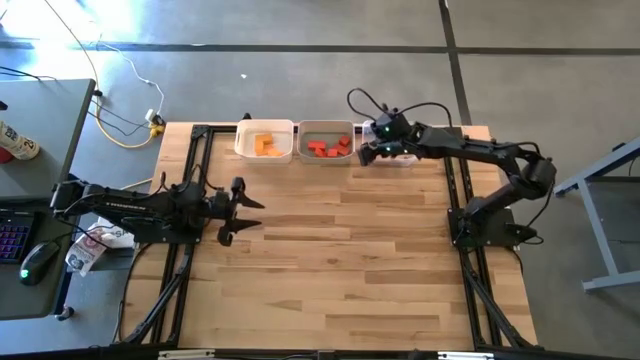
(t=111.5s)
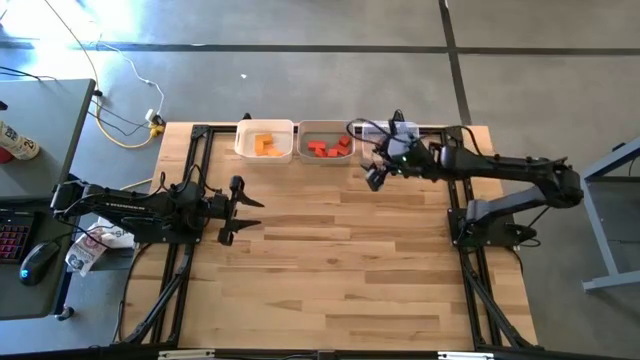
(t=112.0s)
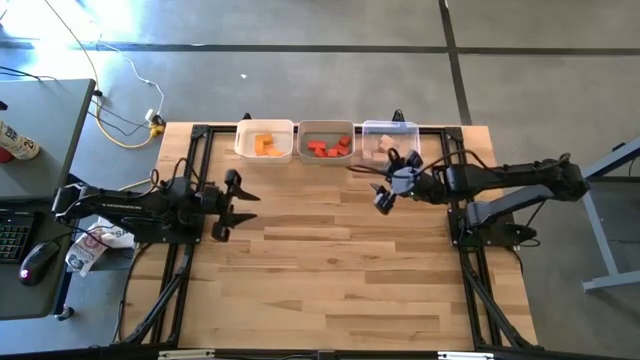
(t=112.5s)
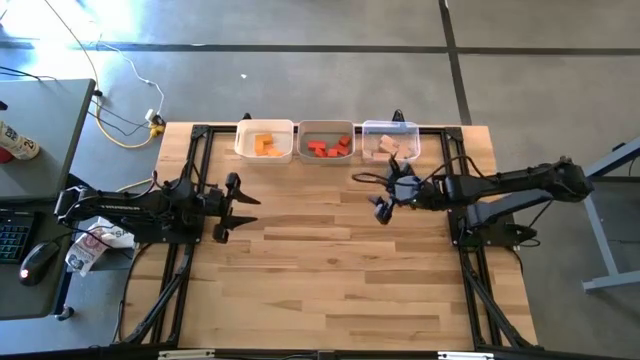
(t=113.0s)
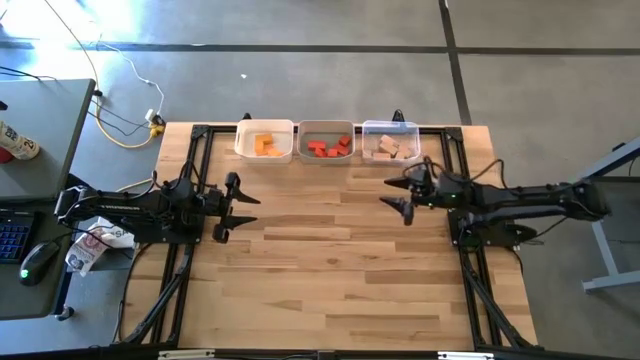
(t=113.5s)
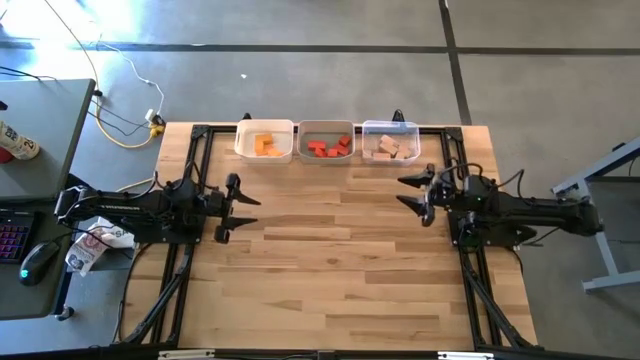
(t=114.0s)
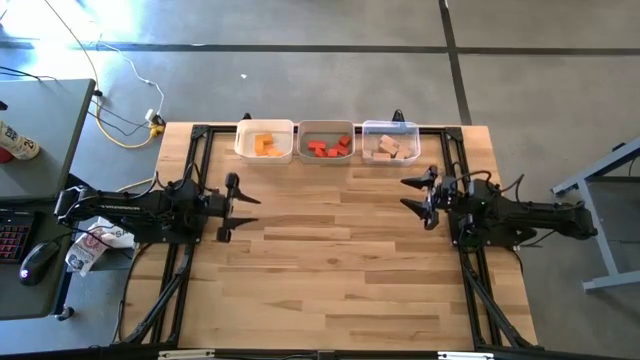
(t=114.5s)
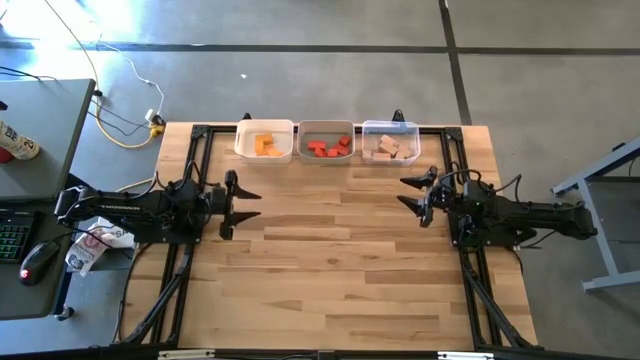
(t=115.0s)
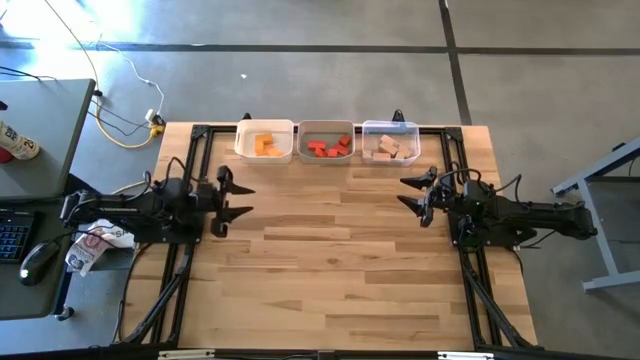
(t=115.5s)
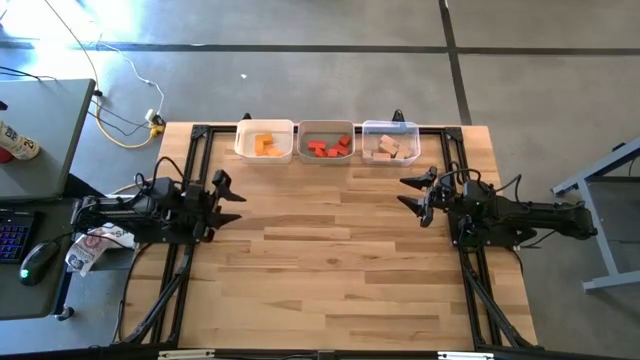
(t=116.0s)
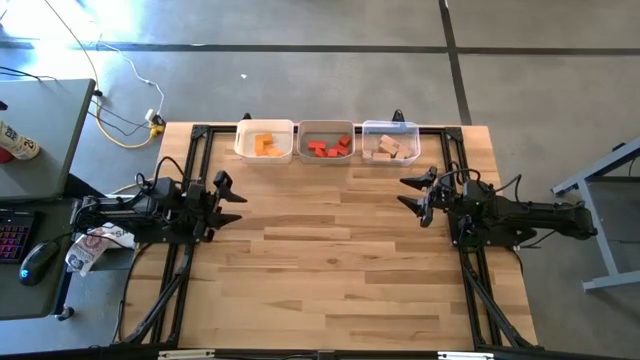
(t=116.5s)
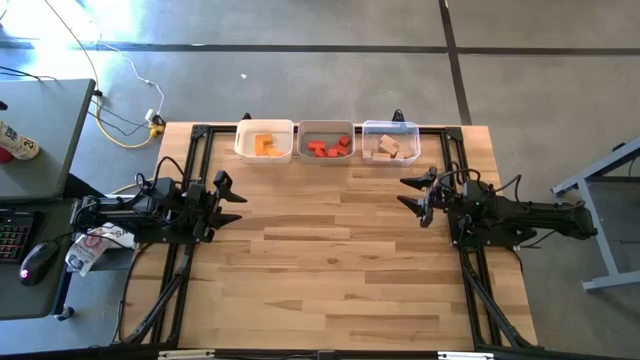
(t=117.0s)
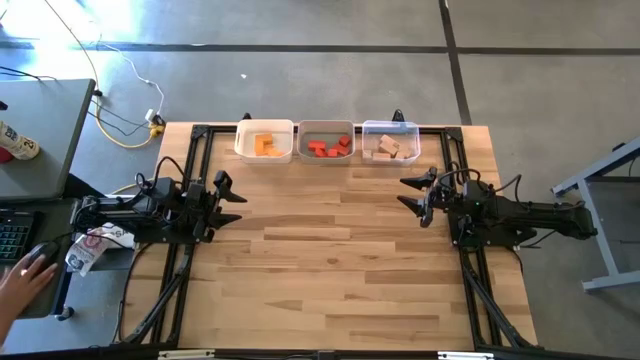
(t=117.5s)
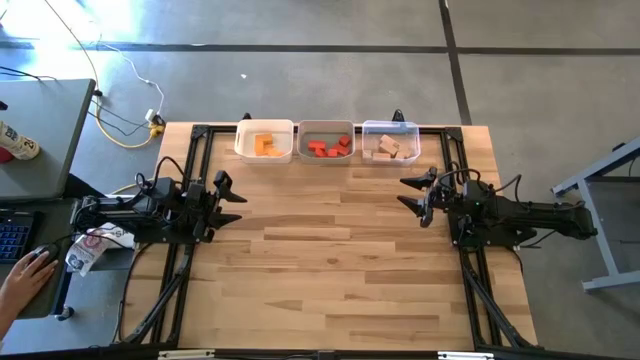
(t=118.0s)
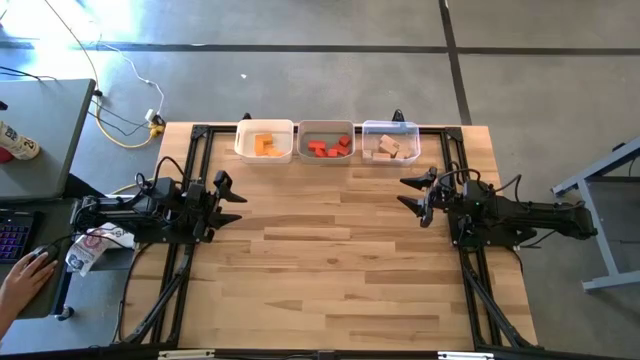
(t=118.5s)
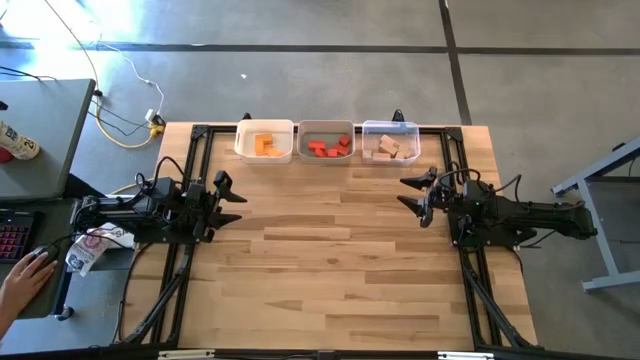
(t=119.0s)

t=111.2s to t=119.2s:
Task: Sort & place blocks by color
Return to Home Position

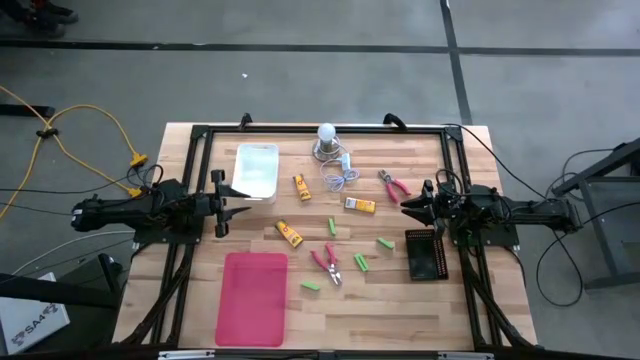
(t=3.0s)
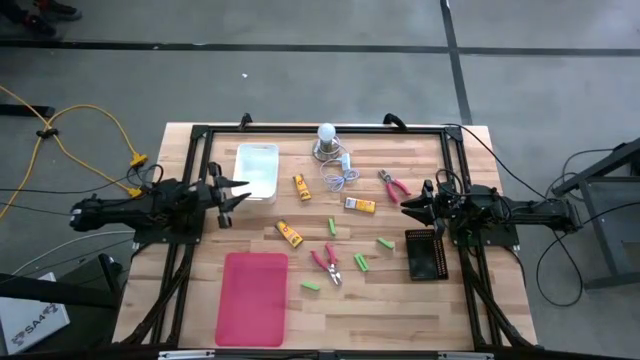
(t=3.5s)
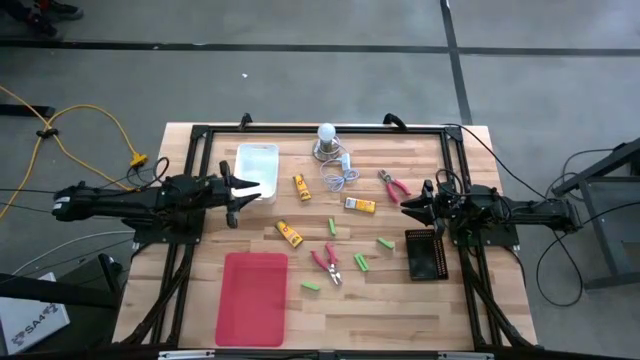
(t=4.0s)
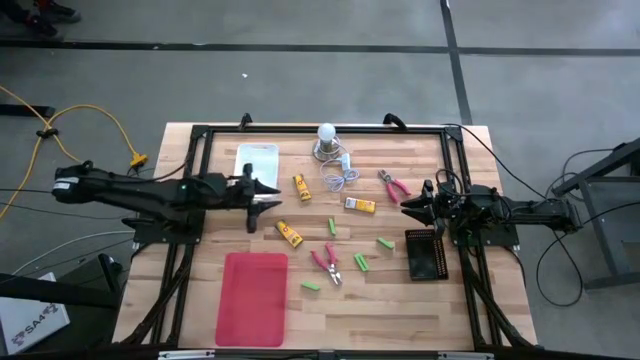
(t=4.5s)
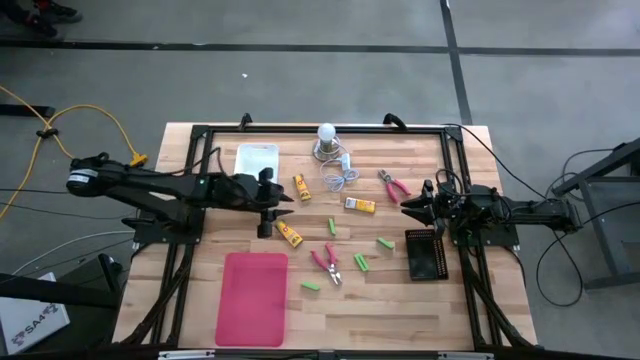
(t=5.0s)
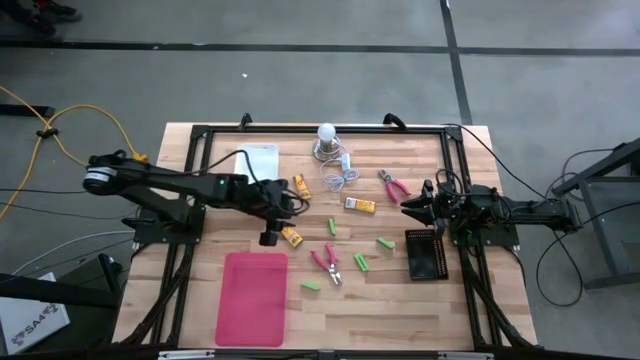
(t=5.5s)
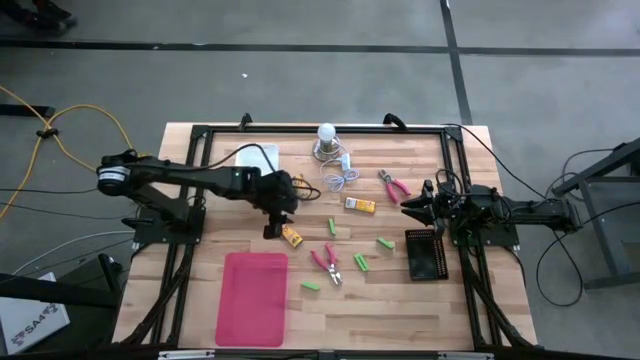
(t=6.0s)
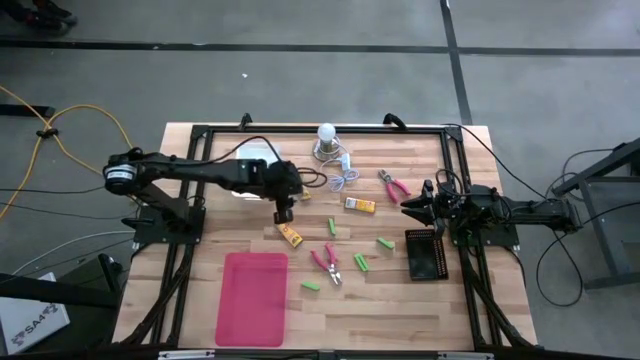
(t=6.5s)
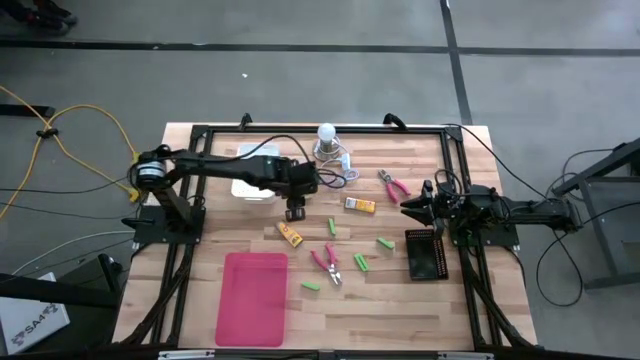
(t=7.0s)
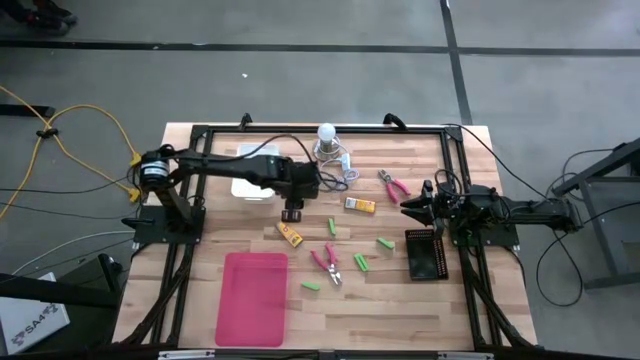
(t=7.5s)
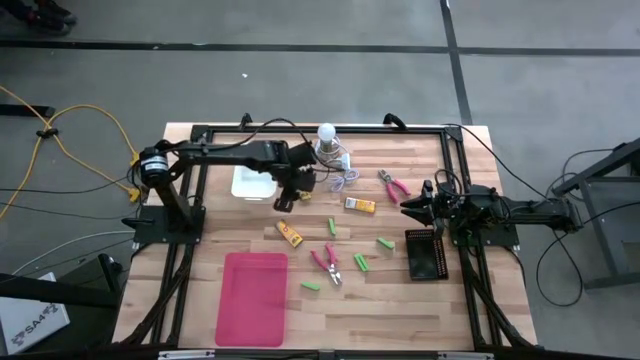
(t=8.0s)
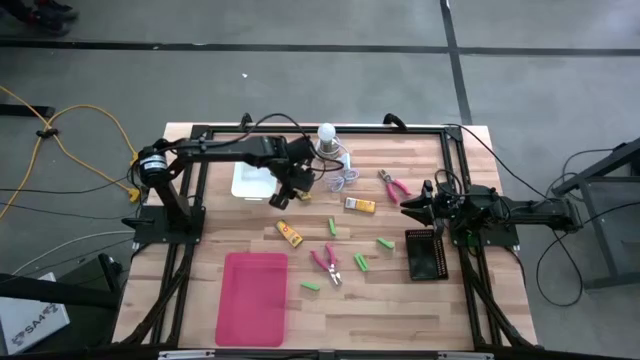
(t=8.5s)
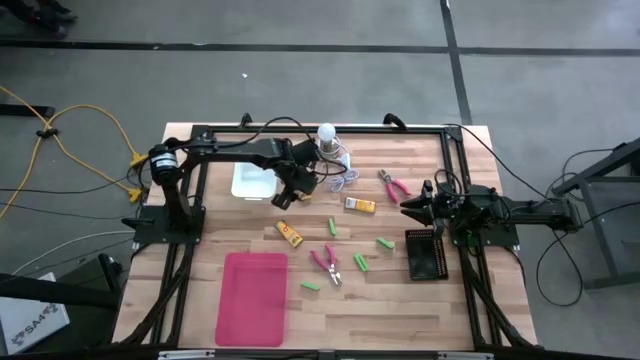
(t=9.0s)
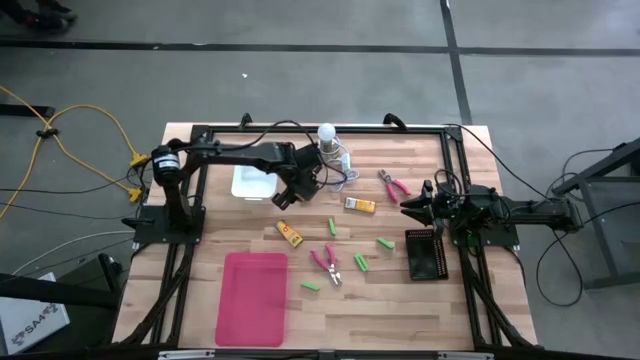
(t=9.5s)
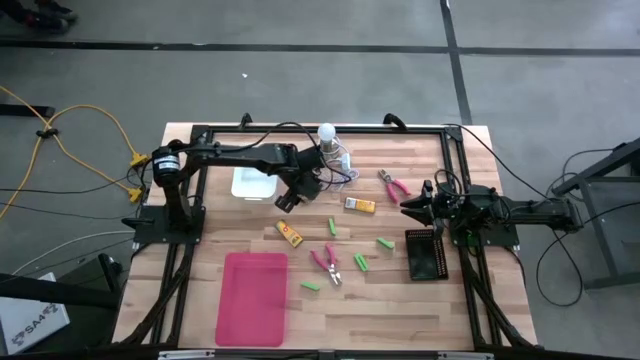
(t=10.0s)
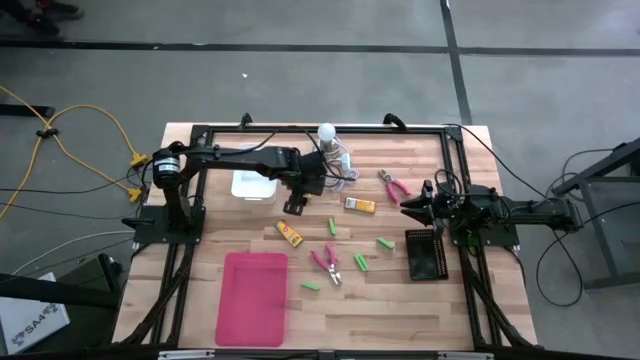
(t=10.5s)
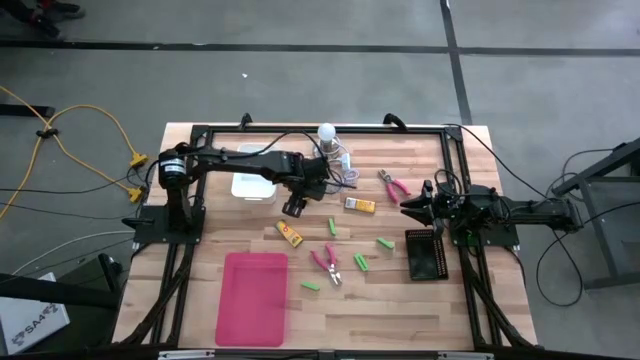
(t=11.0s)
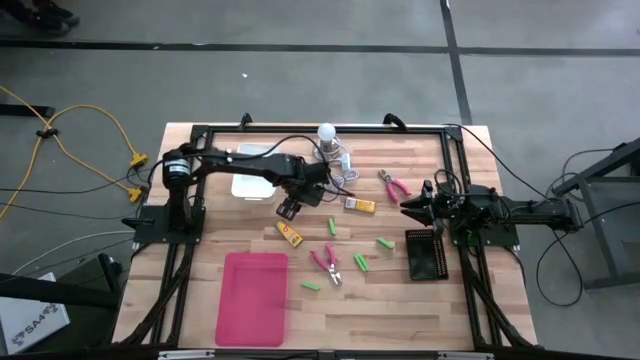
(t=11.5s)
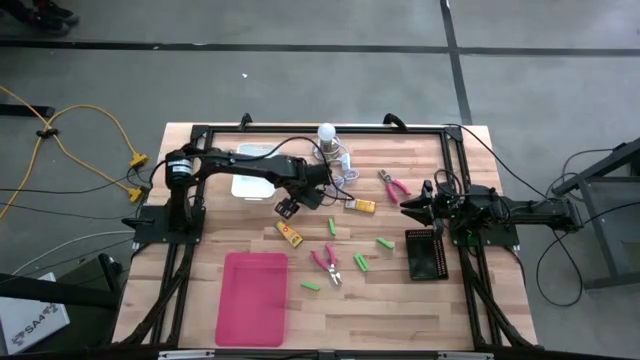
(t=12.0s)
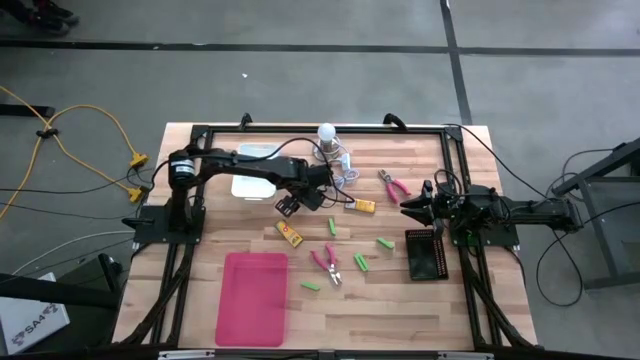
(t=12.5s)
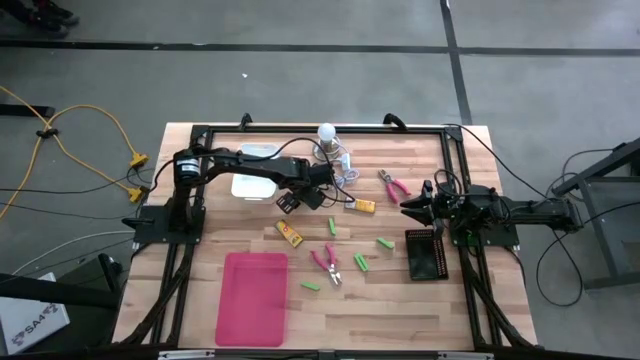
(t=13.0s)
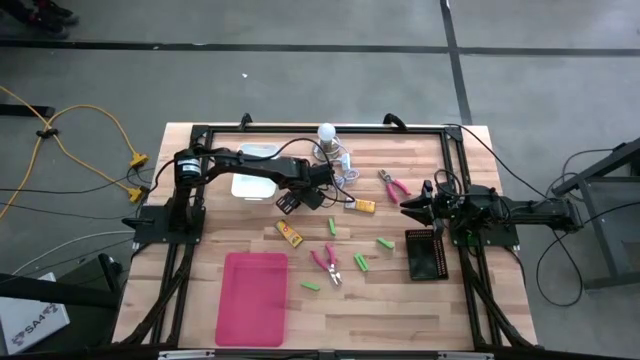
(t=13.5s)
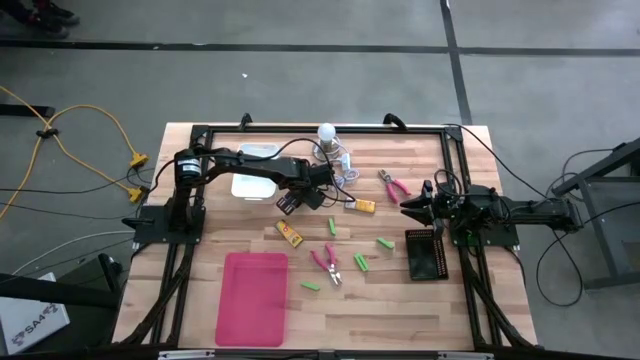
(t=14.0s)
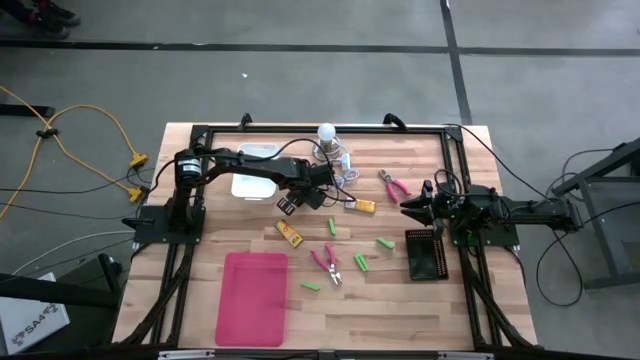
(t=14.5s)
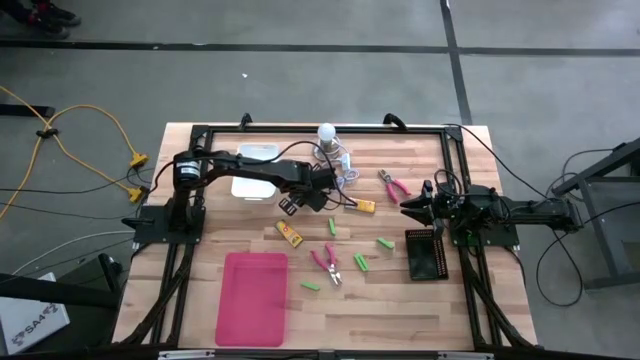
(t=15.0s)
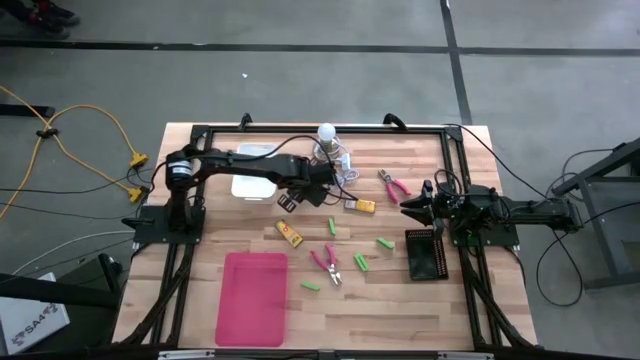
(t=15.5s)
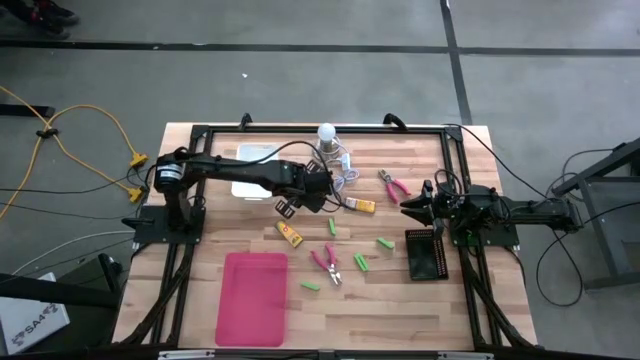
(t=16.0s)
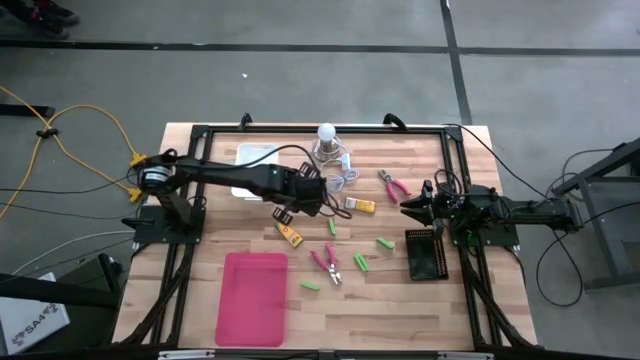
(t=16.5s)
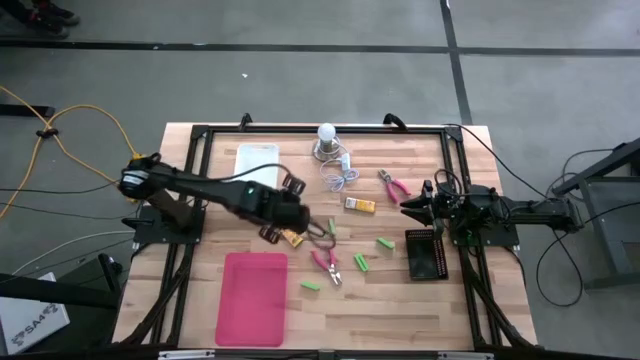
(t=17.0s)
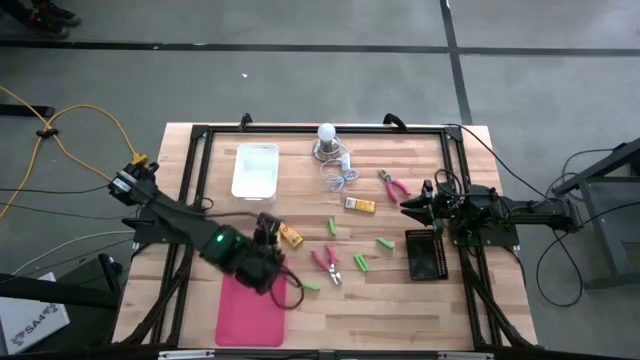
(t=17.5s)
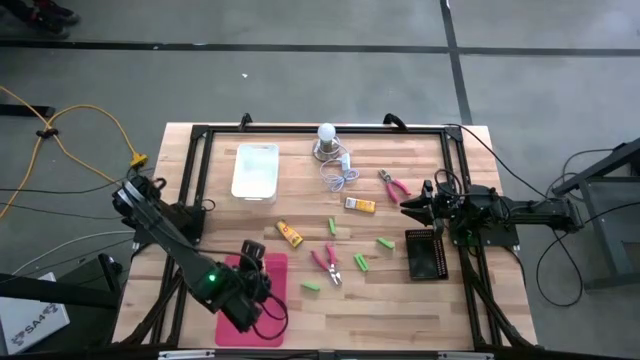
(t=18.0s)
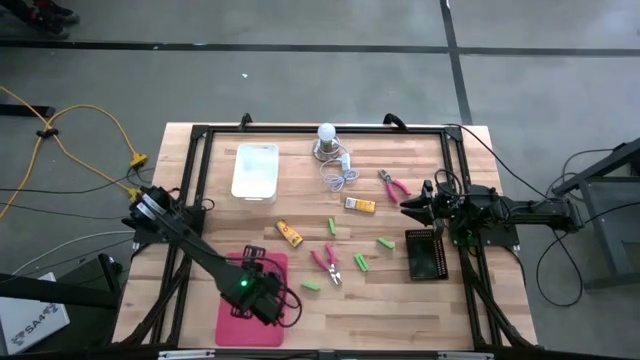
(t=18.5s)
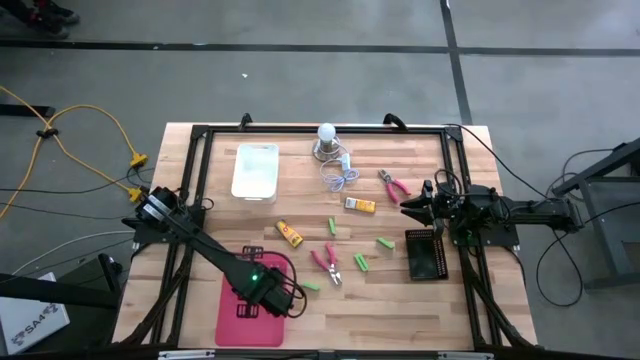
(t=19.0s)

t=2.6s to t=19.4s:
Task: Pick & Place School Supplies
Put the top left crayon box into the pink bin
